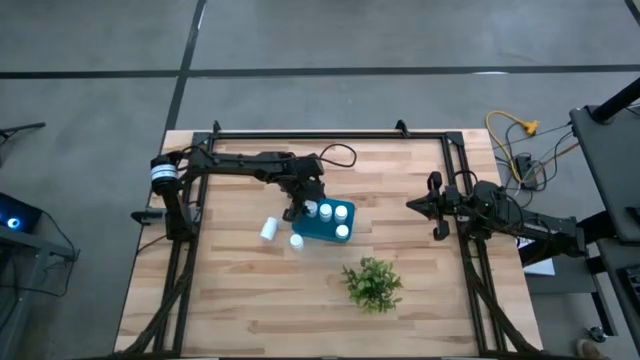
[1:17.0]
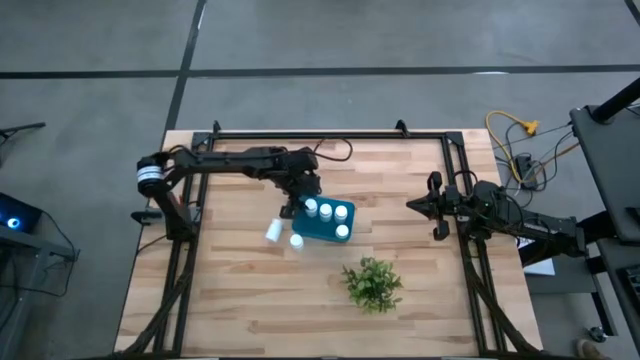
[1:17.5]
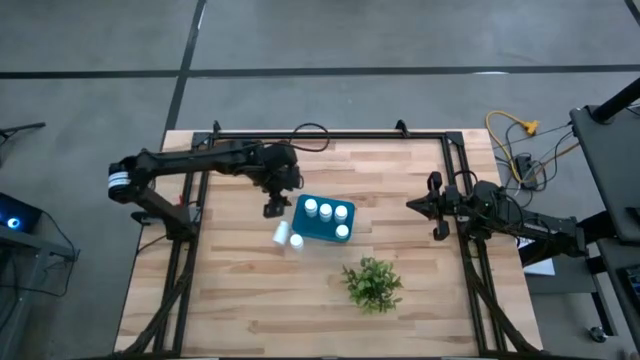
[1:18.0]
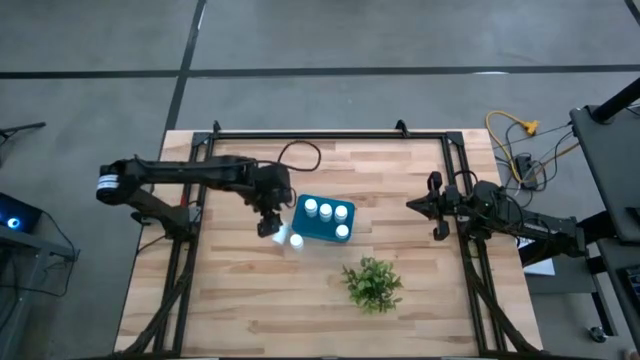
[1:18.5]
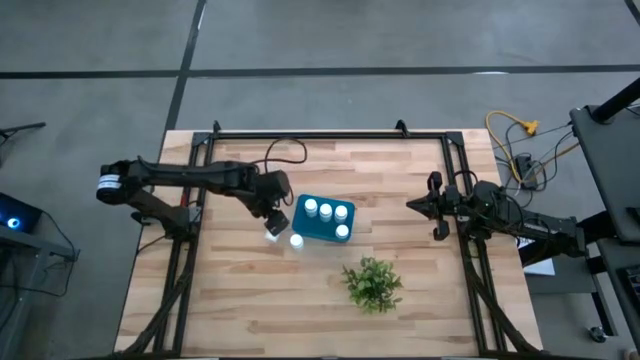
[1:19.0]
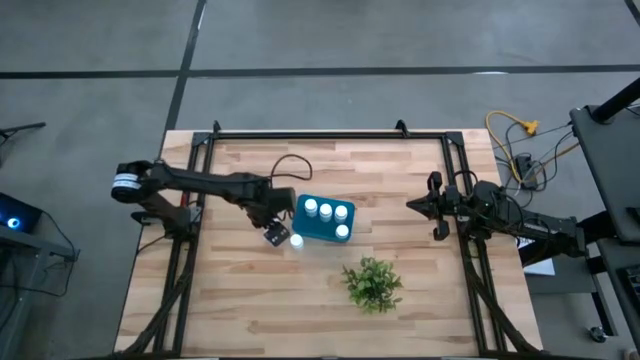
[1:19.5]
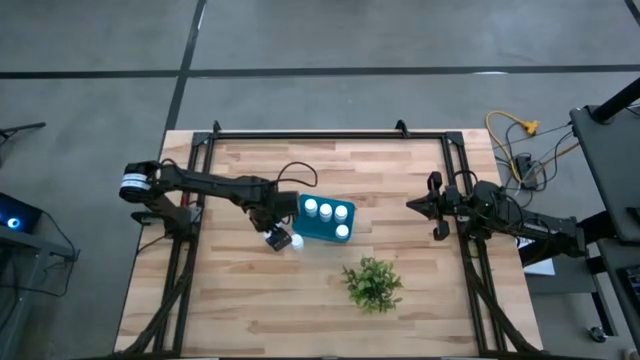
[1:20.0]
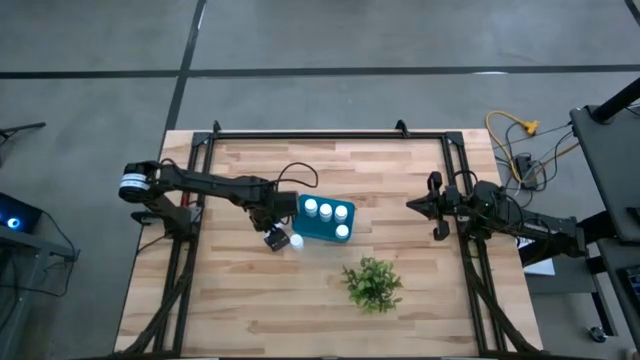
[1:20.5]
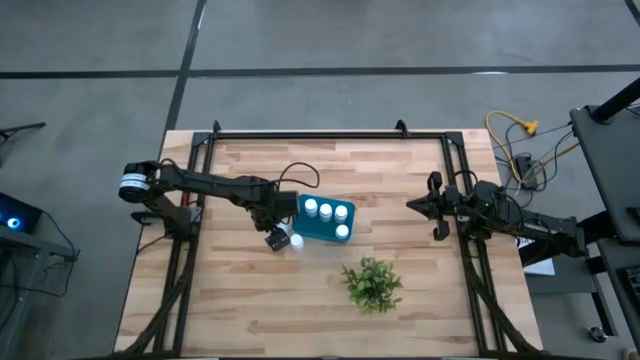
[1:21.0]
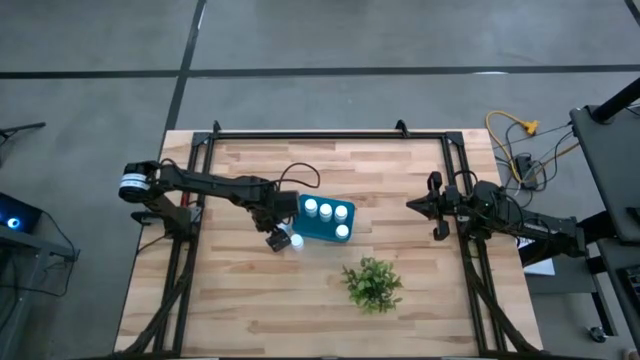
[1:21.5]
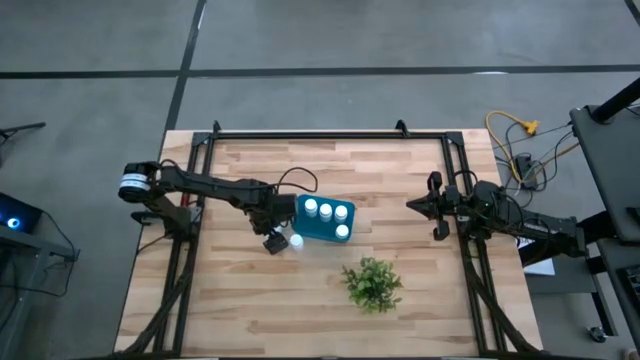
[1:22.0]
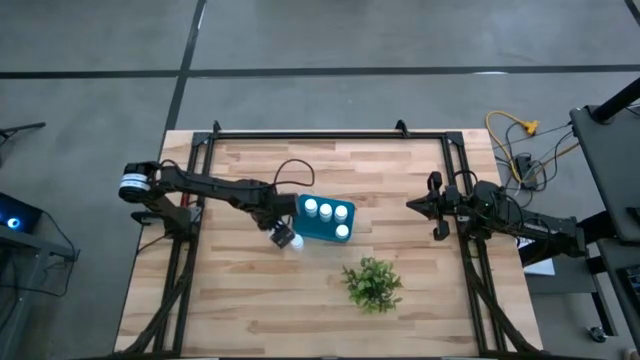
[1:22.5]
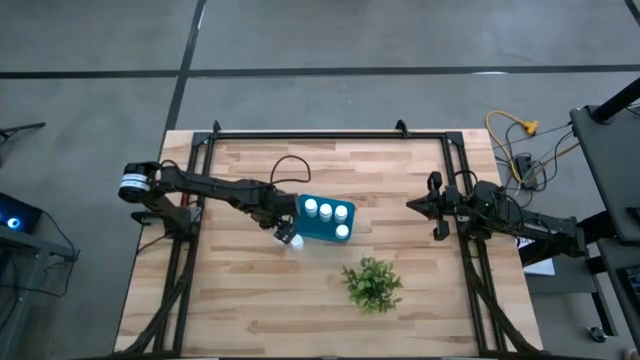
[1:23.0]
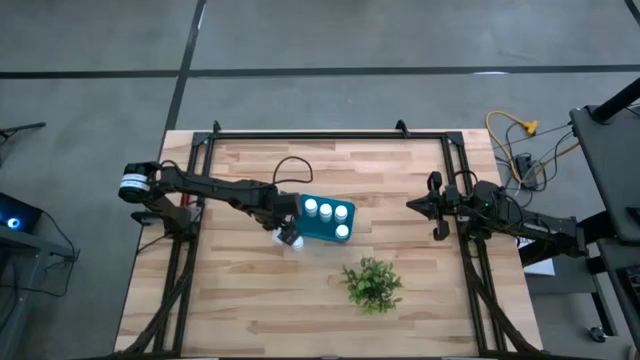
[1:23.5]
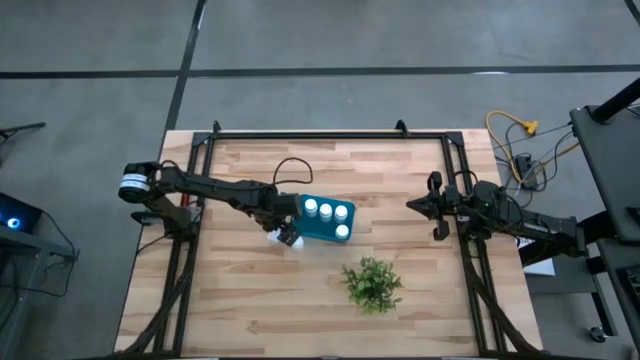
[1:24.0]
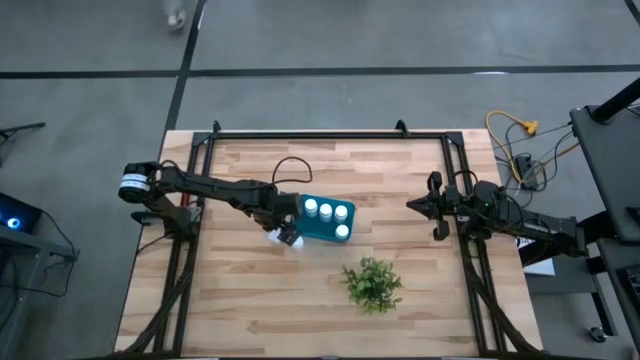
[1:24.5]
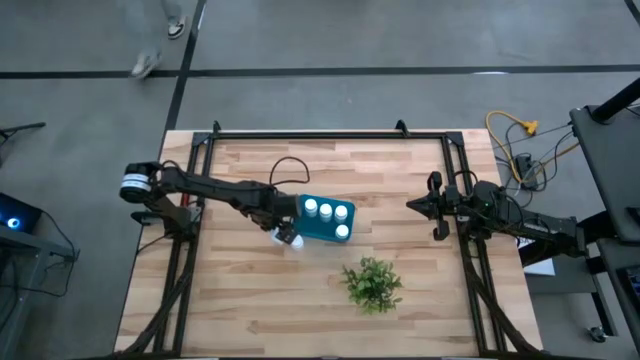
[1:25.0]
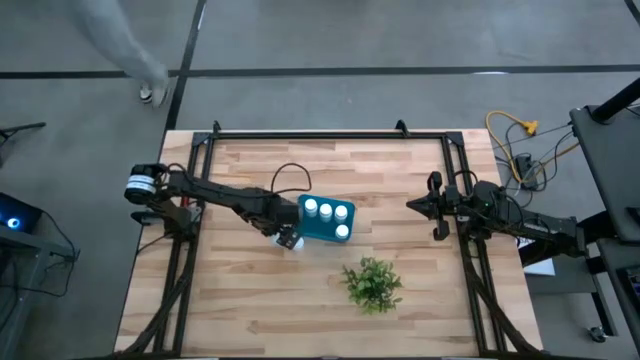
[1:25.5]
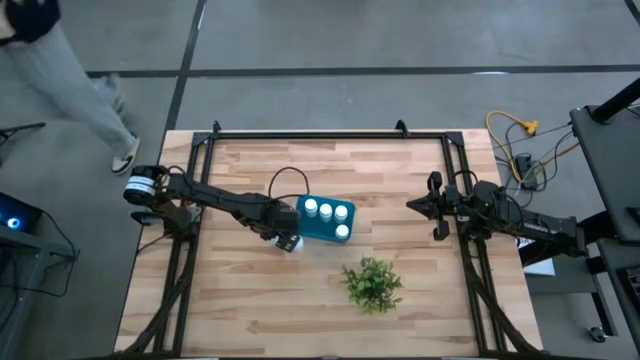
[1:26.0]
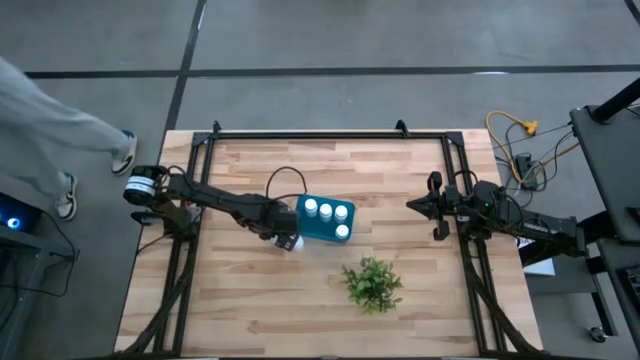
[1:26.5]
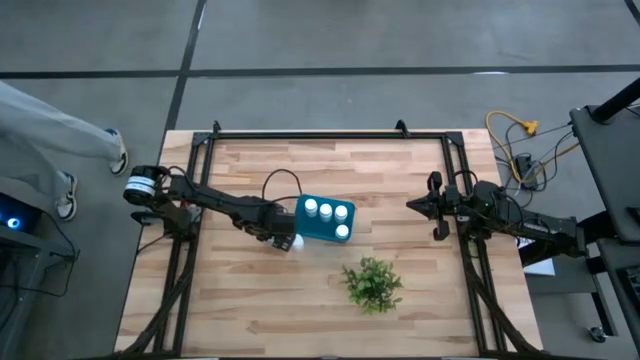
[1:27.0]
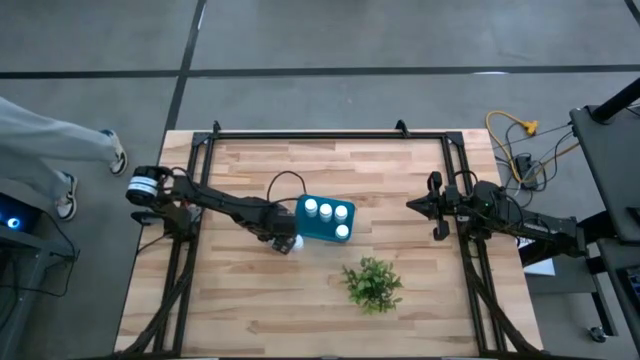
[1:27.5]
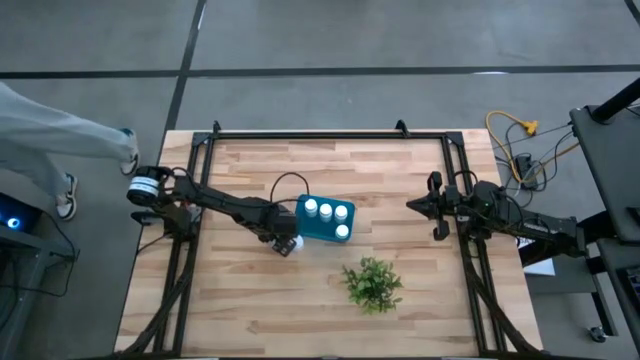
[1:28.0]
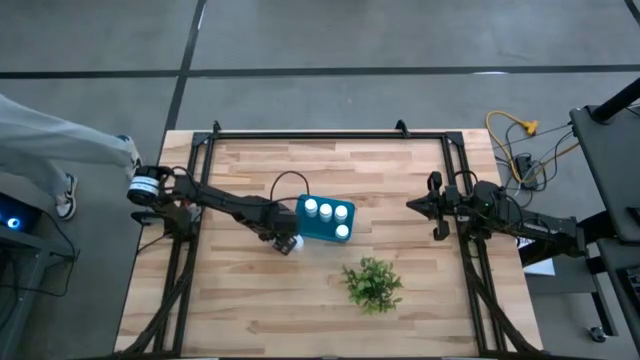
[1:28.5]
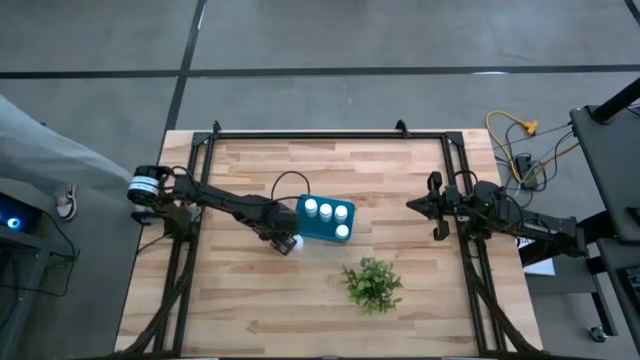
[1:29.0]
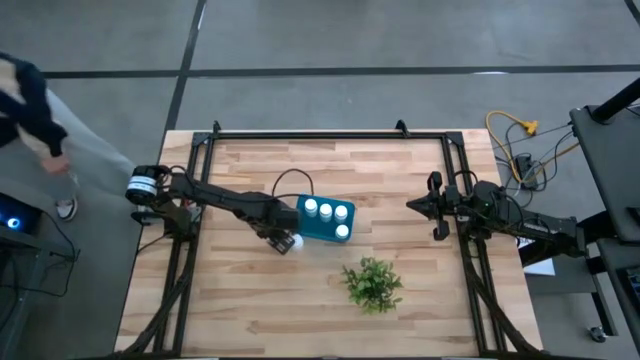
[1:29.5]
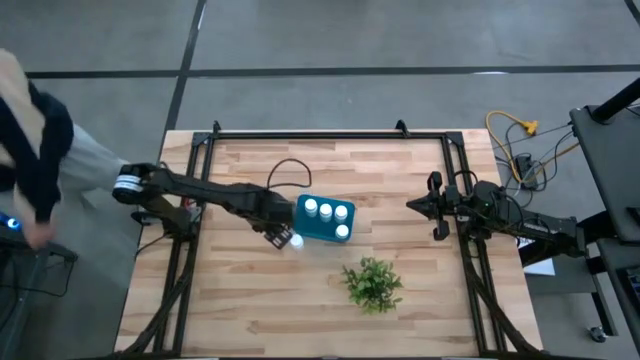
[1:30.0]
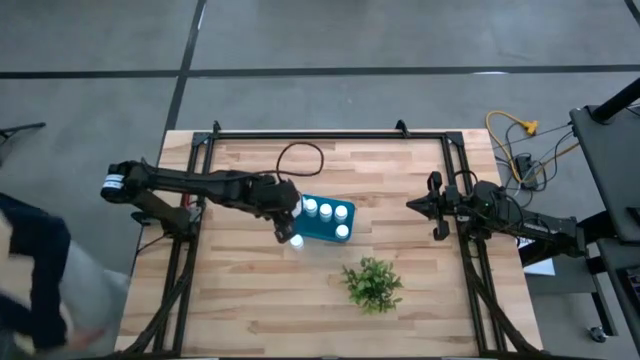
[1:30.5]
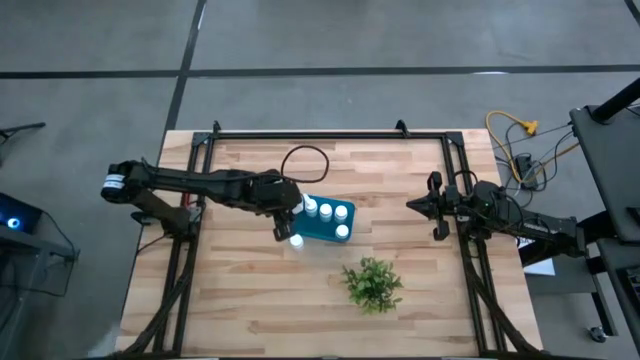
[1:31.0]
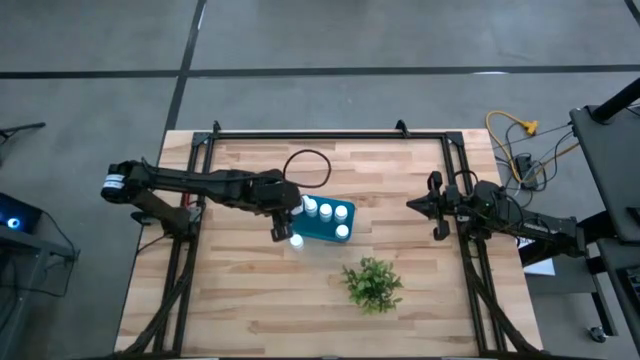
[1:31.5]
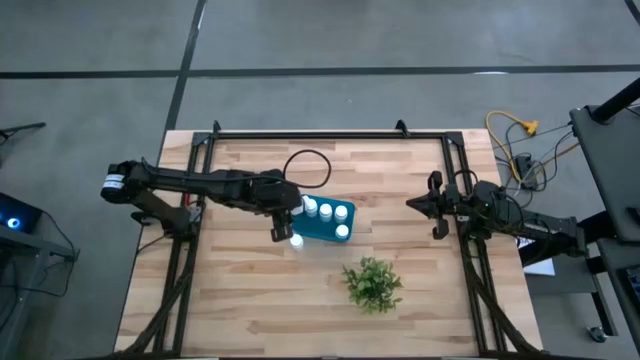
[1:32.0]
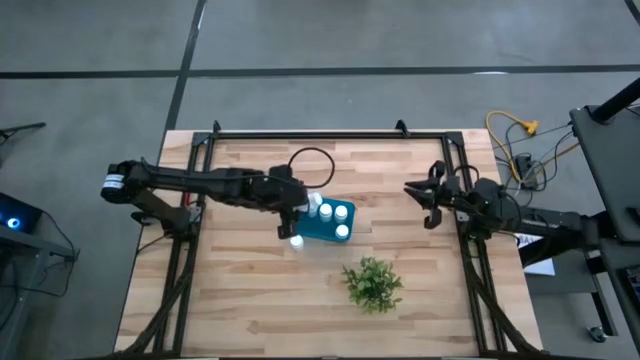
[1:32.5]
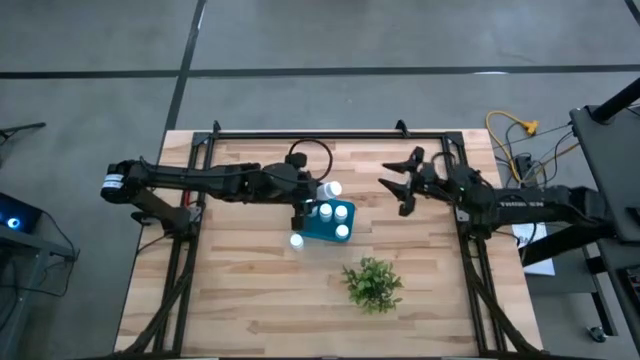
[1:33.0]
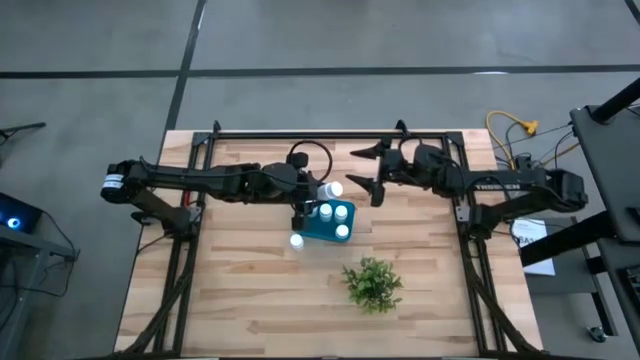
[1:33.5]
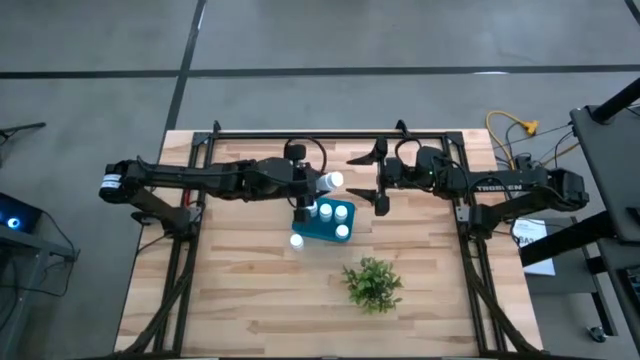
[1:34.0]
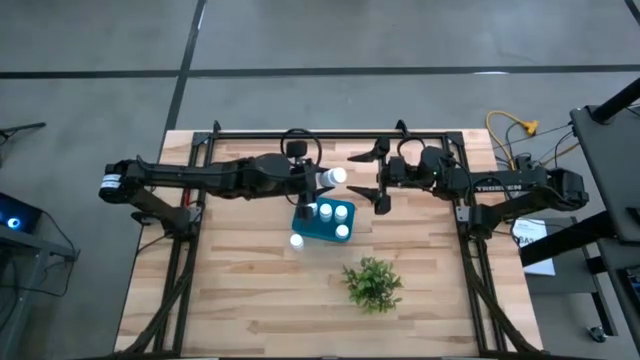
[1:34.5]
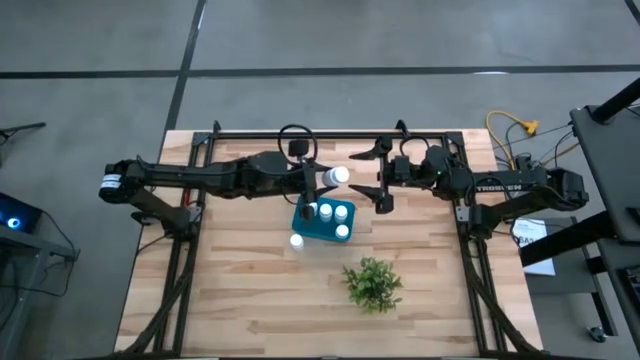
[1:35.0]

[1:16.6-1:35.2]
Task: Pick and place pill bottles into a basket
Put the white pill bottle in the blue bin

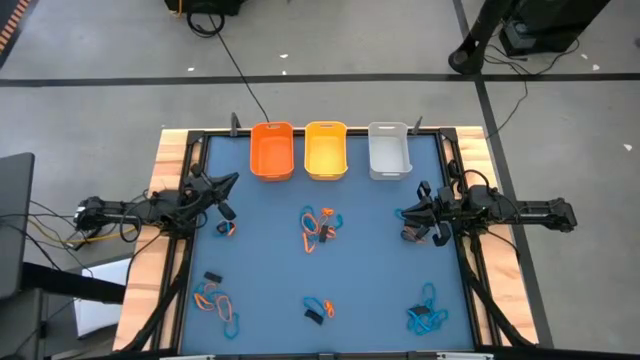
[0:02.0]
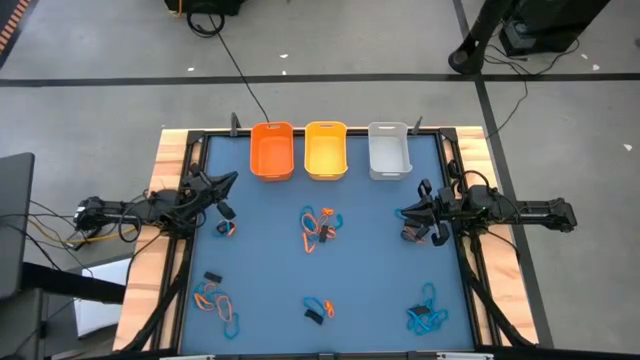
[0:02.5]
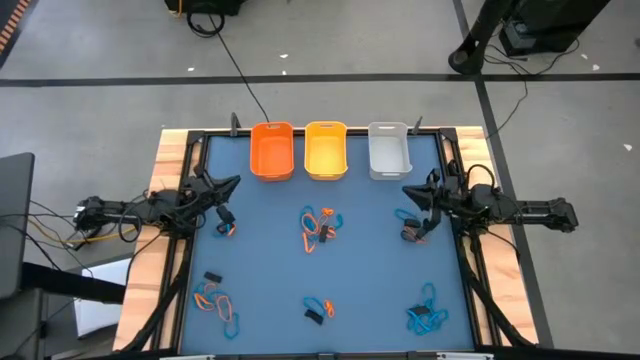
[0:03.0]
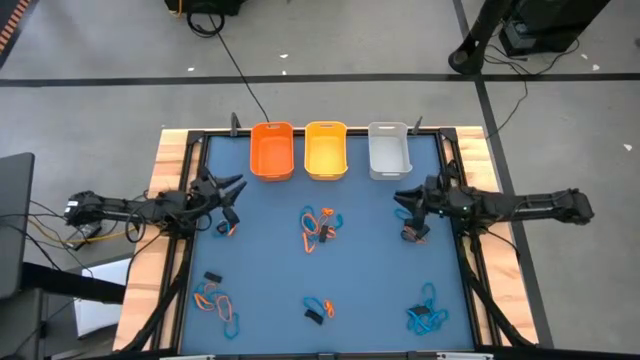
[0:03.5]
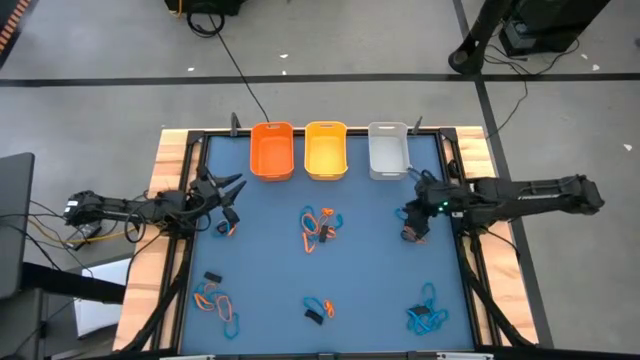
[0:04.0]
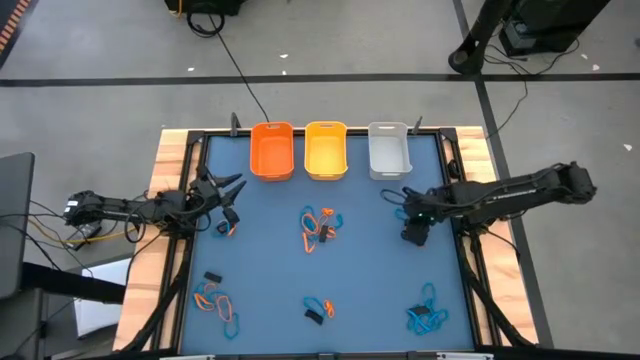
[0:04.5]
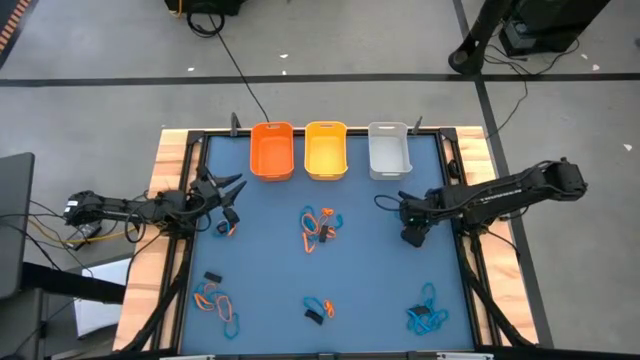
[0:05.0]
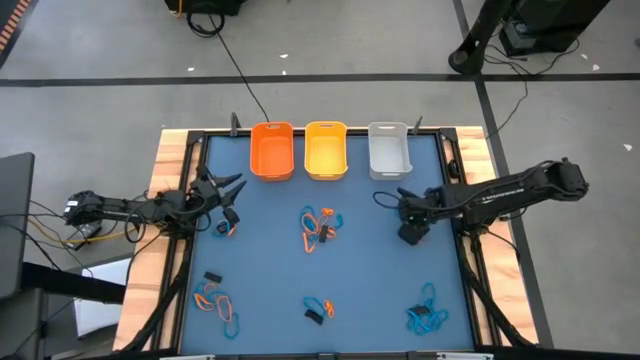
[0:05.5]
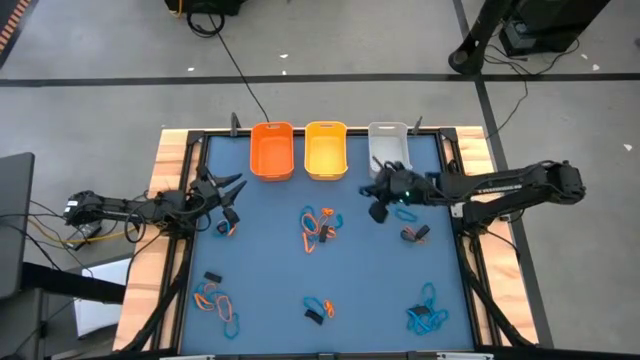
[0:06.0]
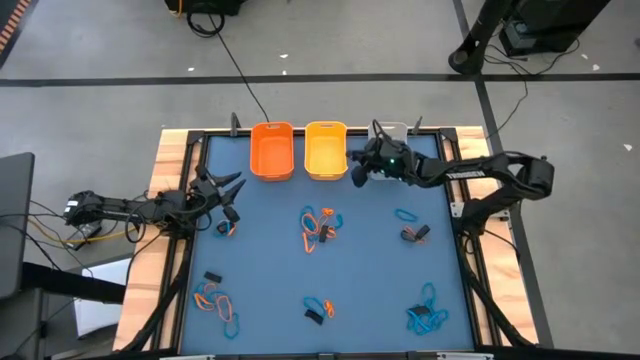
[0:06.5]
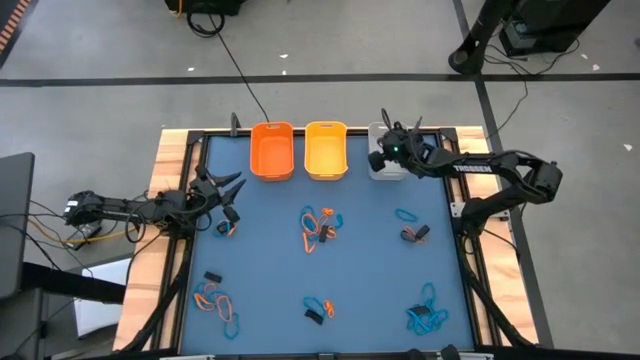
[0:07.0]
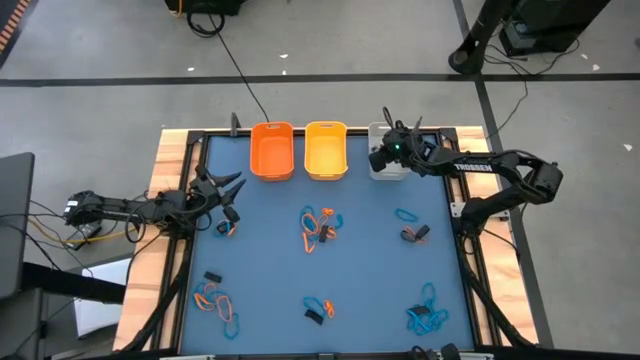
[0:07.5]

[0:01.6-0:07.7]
Task: Sort rubber bands into baskets
Put the black rubber band into the gray bin
